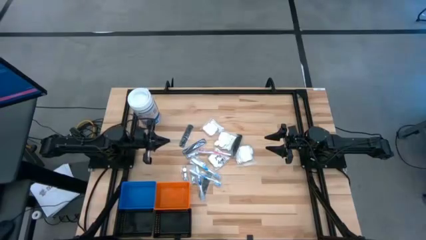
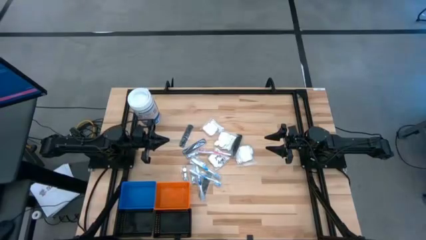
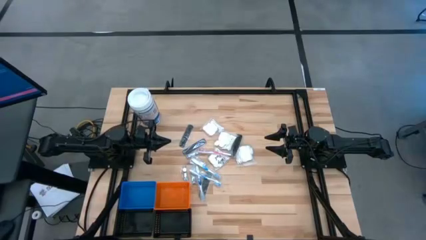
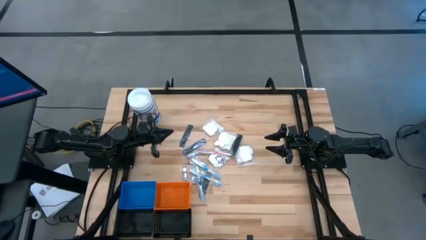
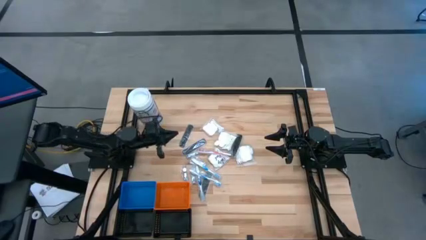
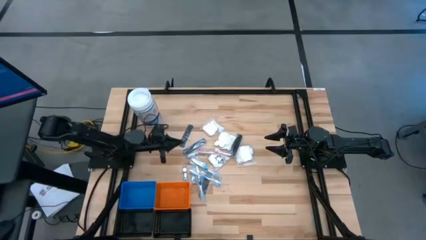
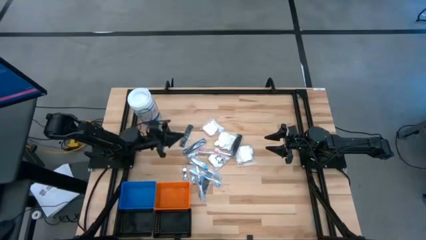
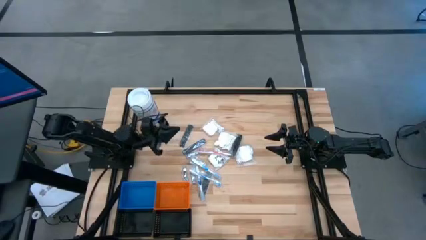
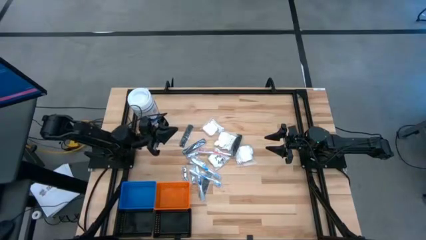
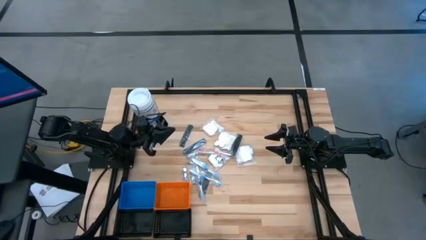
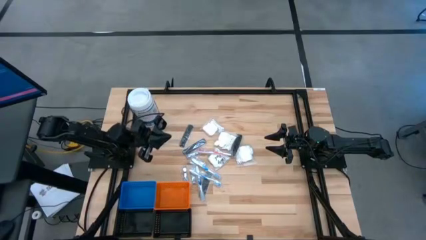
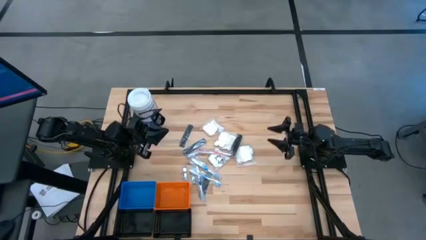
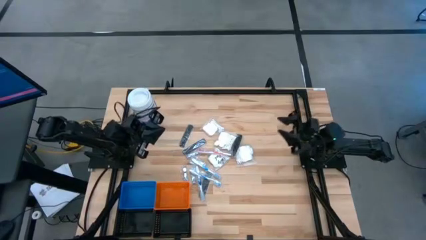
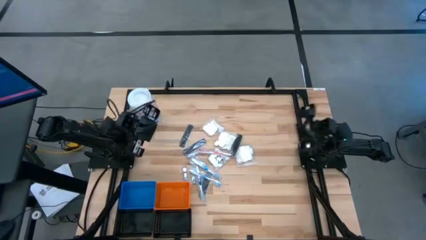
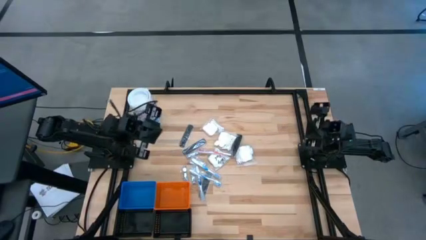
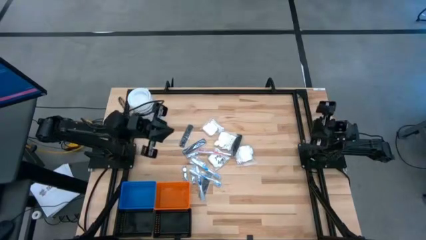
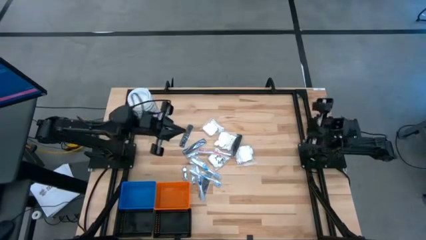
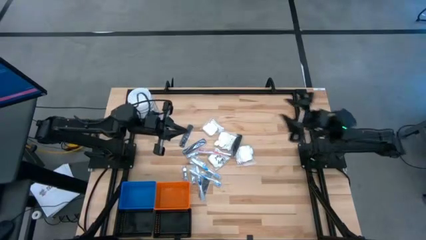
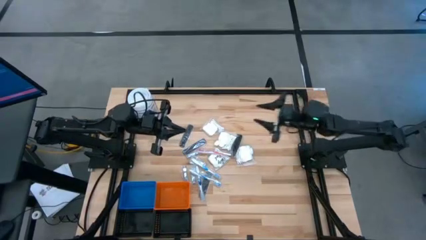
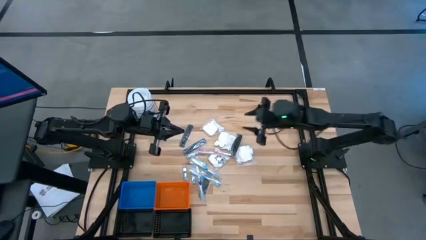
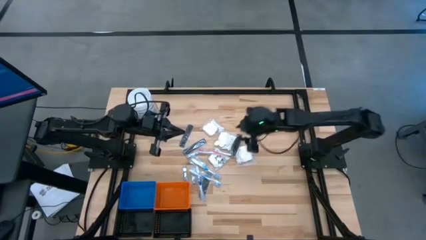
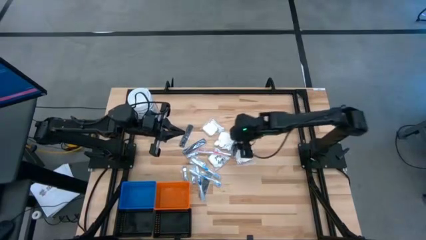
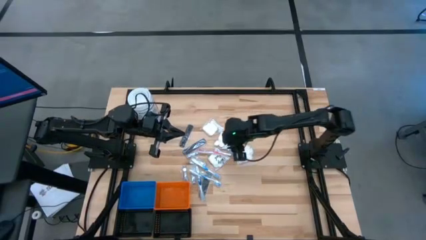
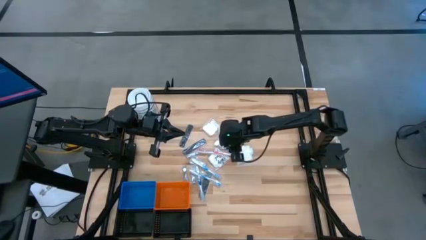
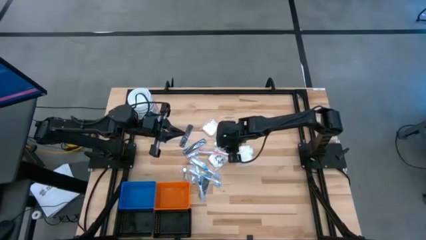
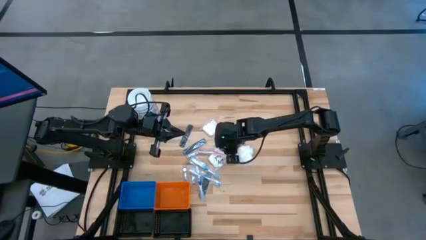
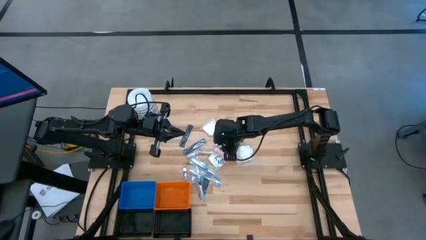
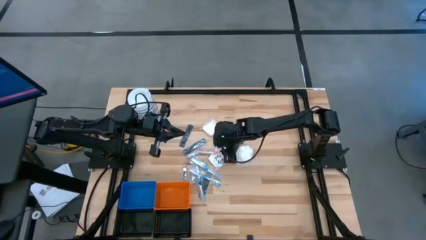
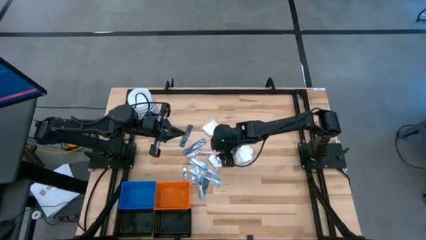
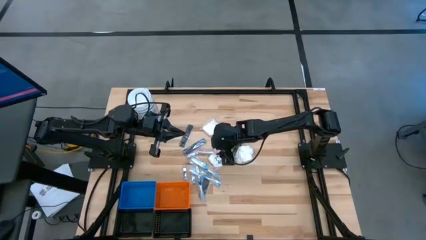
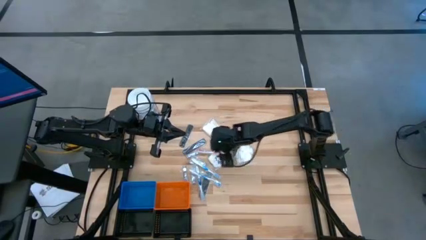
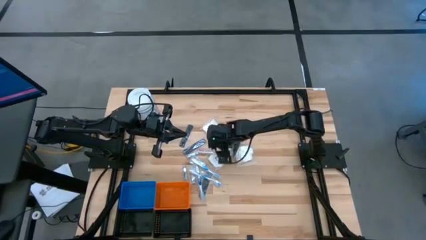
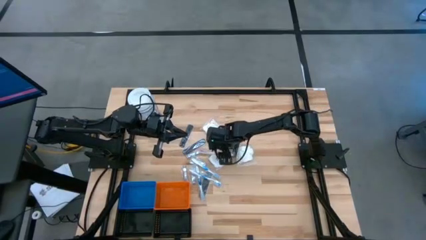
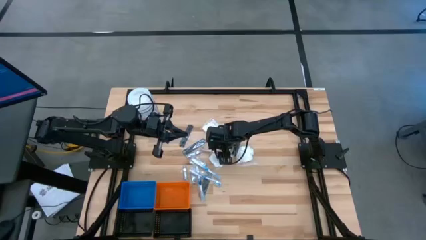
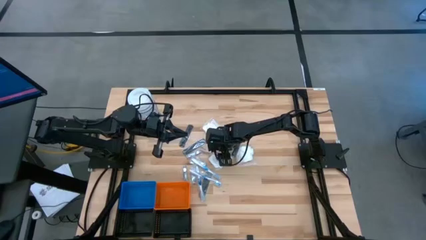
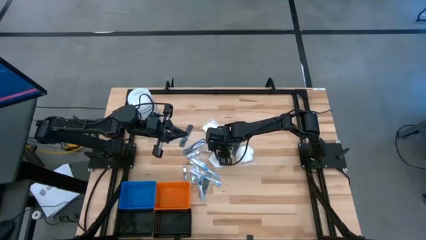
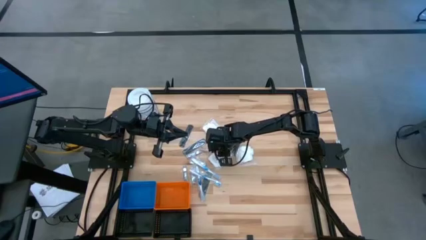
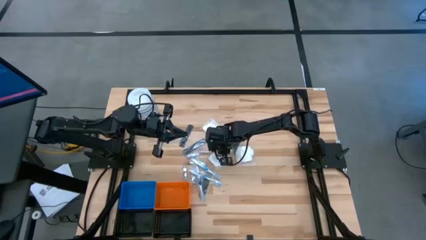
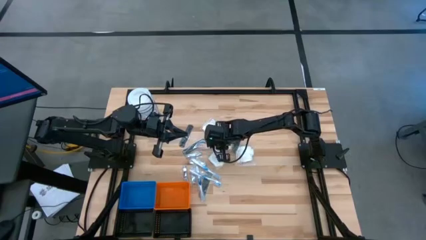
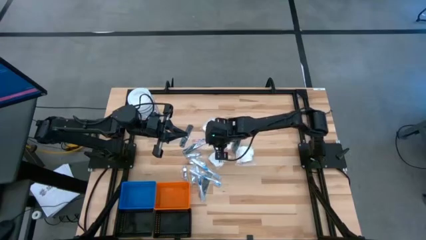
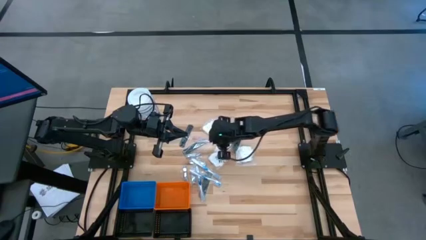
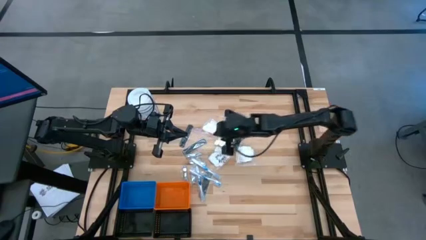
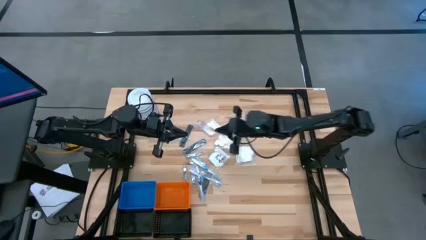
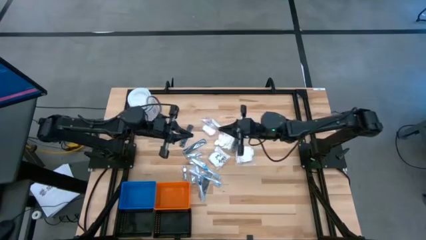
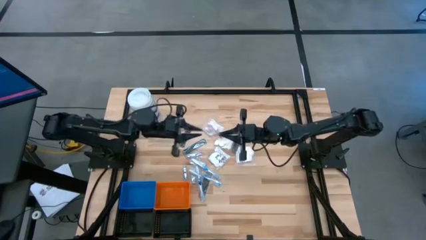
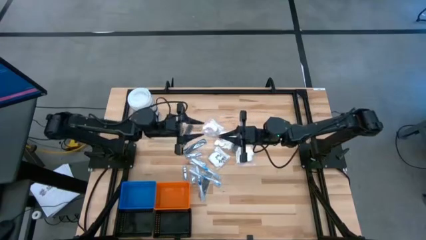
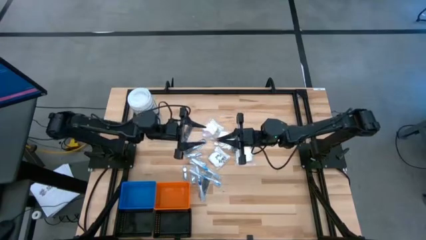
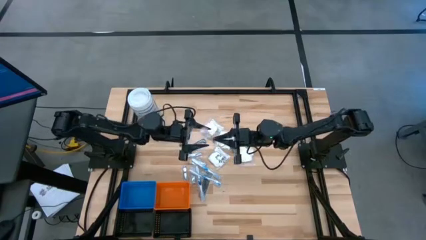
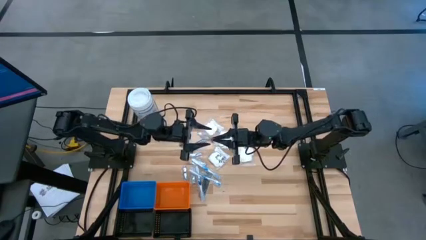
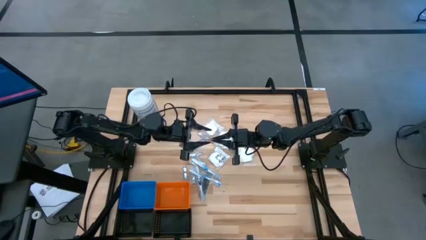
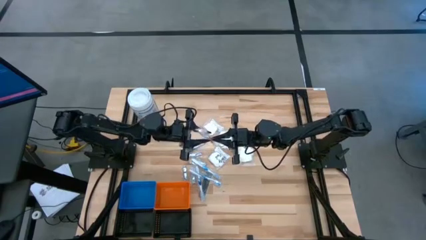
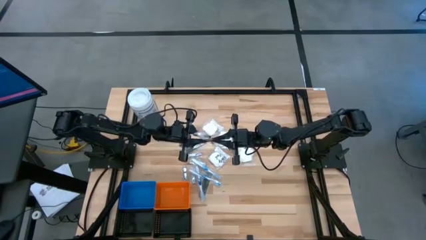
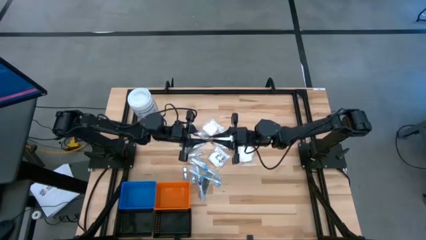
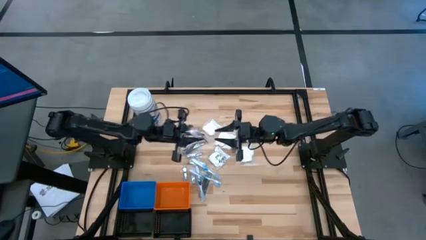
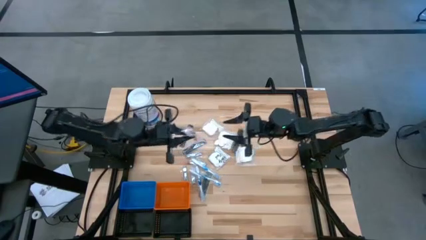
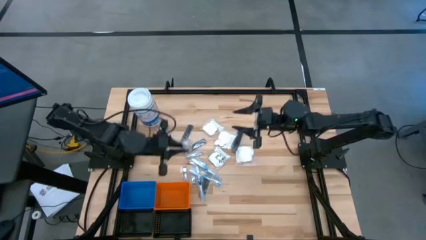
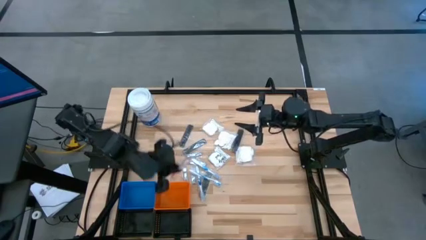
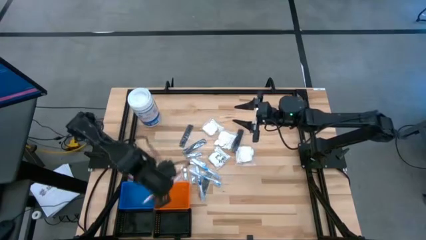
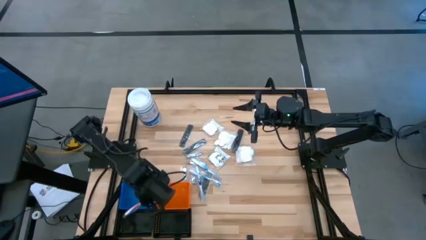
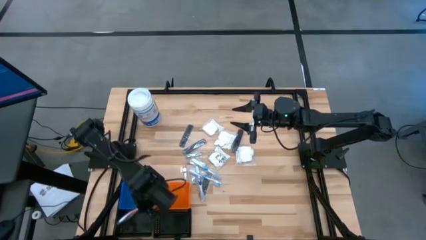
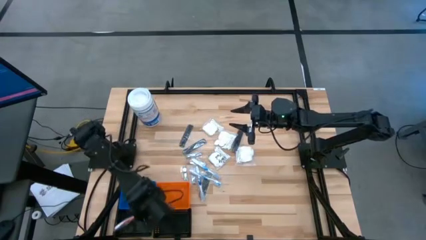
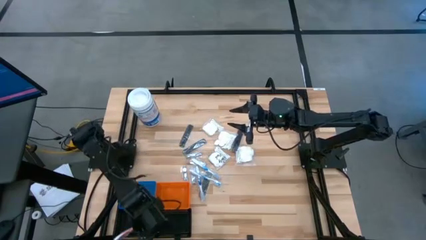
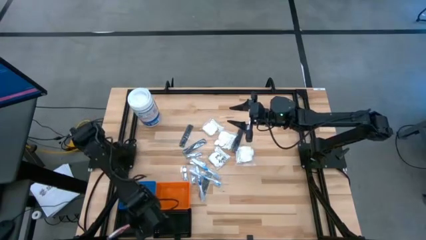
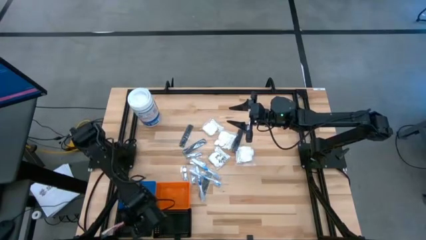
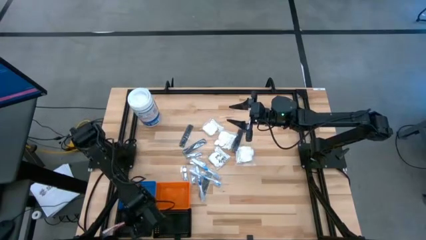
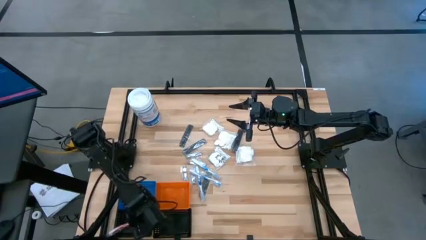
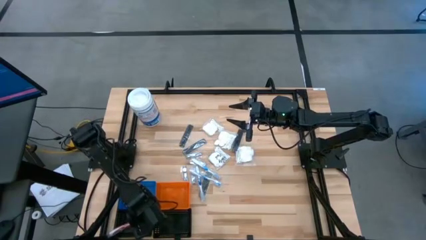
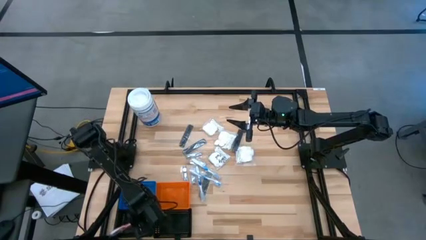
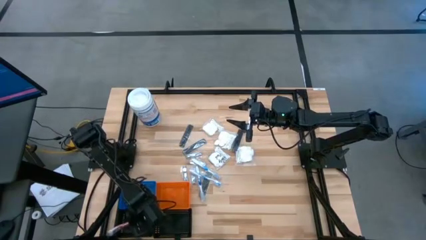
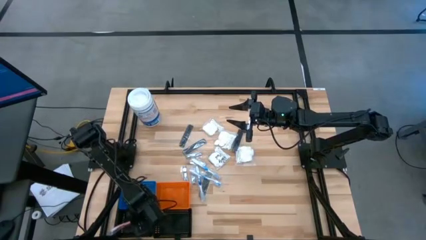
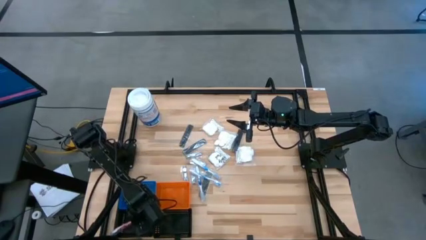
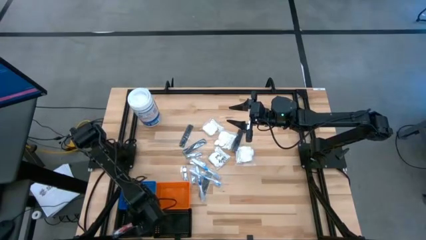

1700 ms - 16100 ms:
Task: Pick & Place Travel size toiletries
Put the red toothbrush into the left black basket

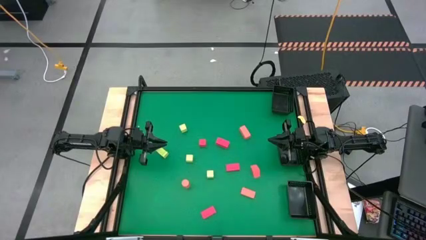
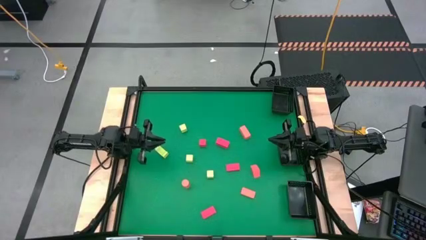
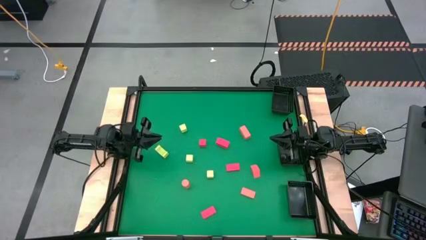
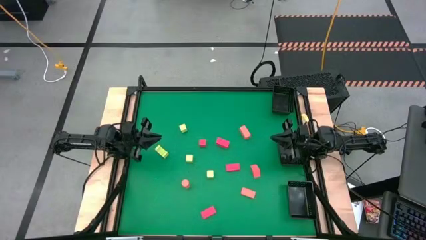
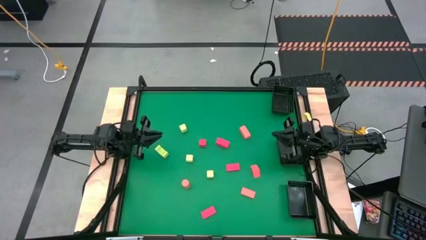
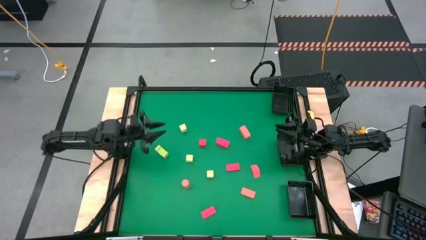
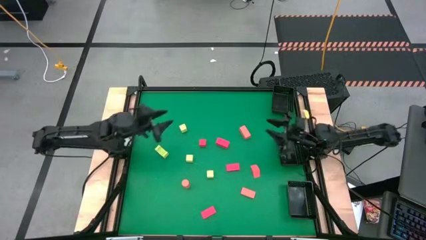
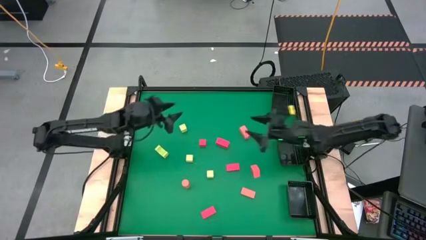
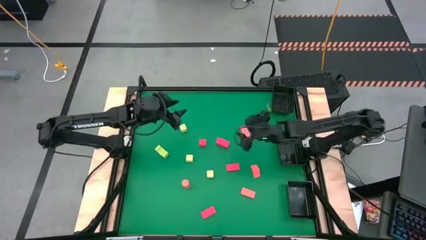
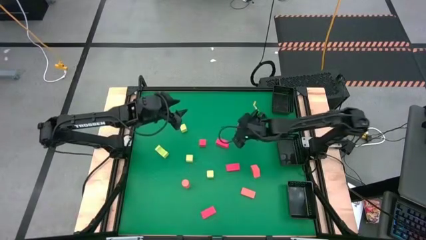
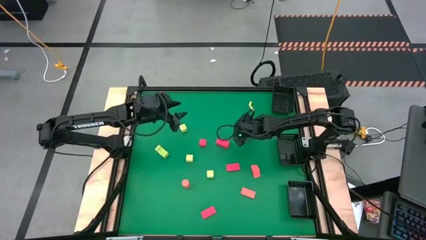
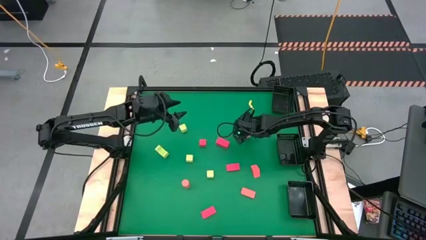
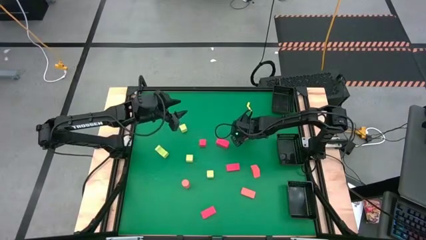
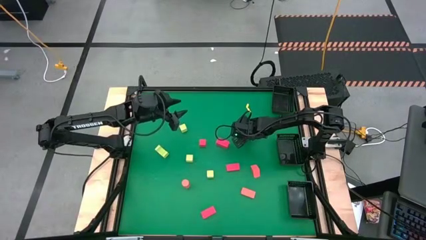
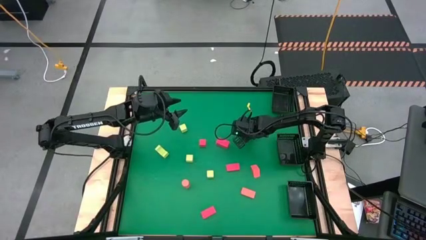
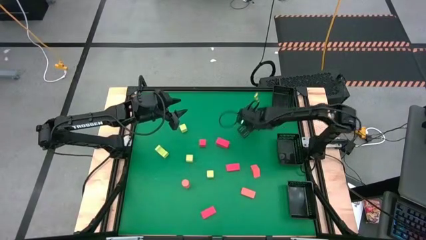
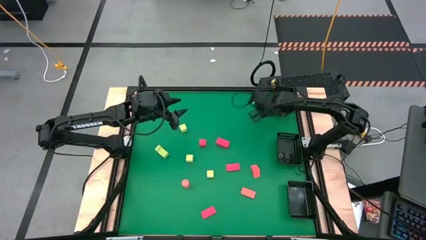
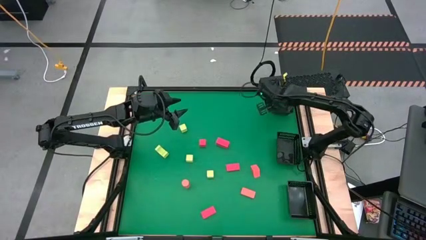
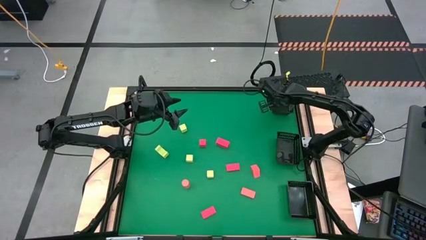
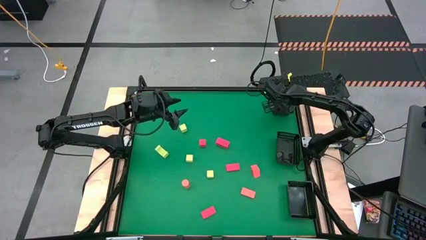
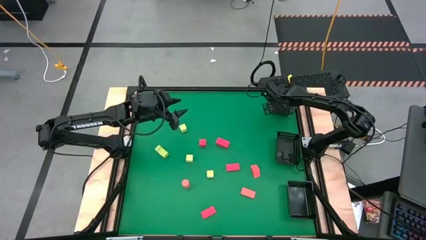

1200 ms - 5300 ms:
Task: Sort & place blocks by color
Put the top right orange block into the top right black bin
